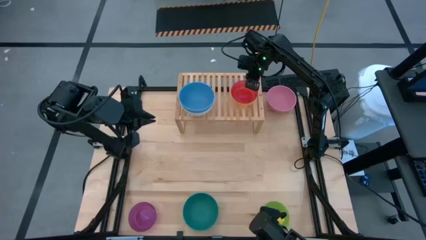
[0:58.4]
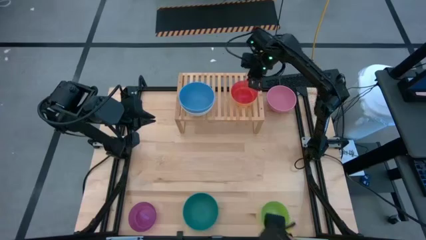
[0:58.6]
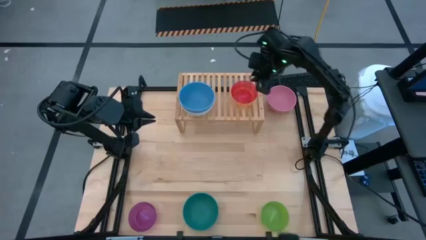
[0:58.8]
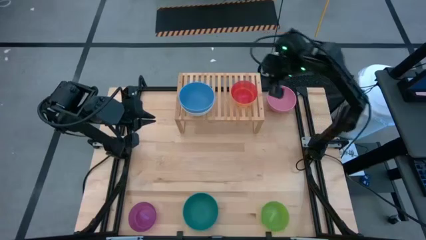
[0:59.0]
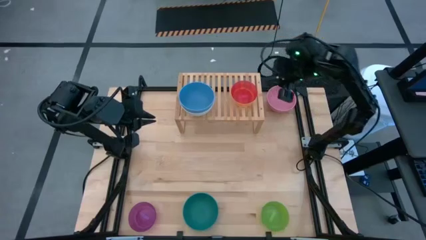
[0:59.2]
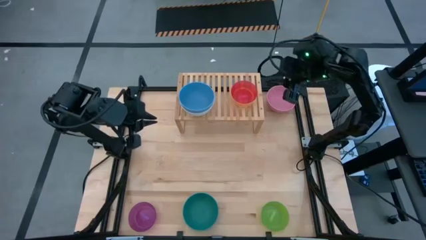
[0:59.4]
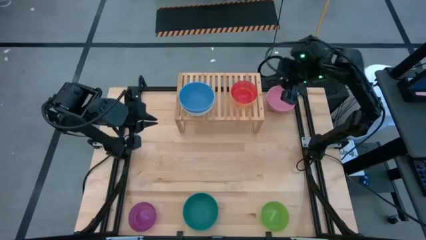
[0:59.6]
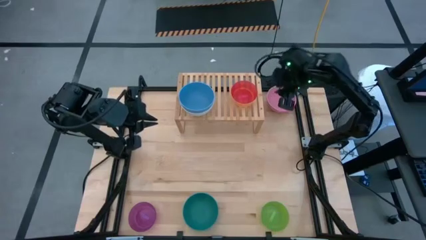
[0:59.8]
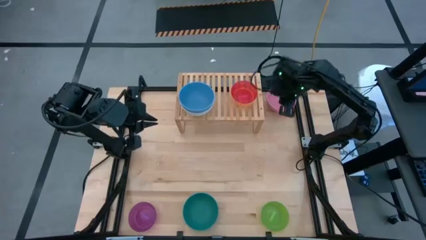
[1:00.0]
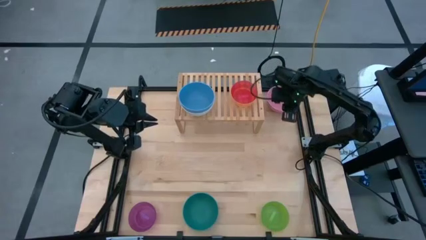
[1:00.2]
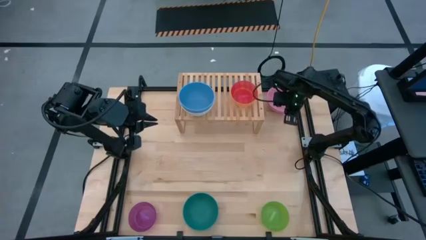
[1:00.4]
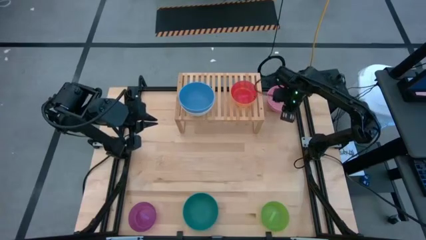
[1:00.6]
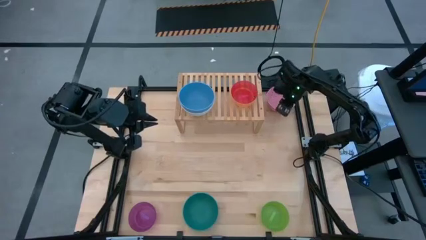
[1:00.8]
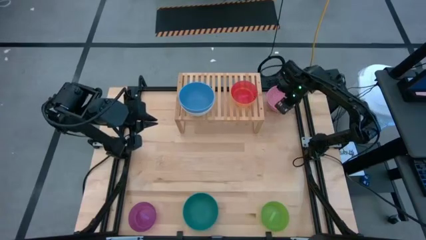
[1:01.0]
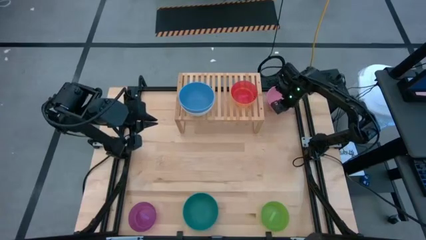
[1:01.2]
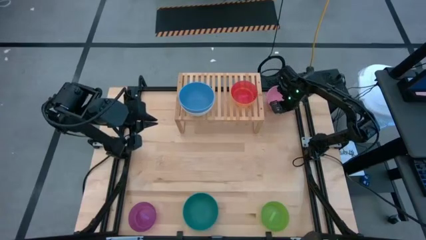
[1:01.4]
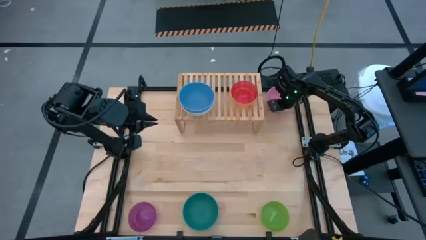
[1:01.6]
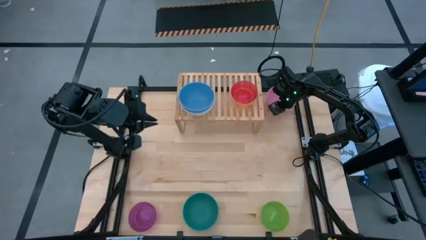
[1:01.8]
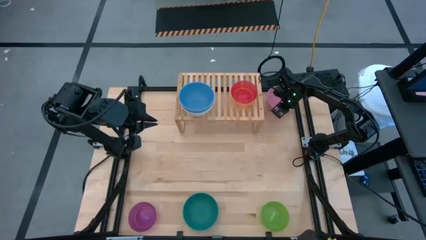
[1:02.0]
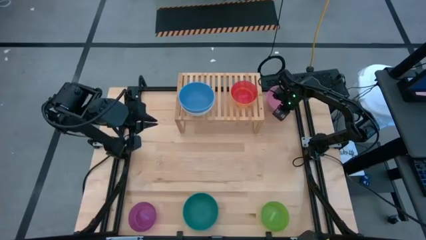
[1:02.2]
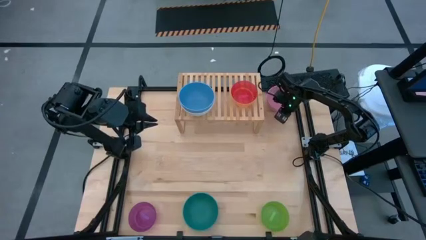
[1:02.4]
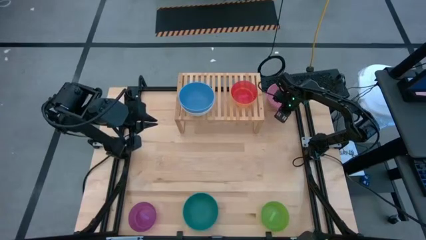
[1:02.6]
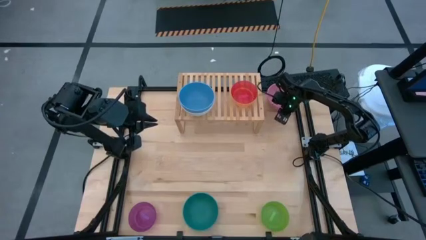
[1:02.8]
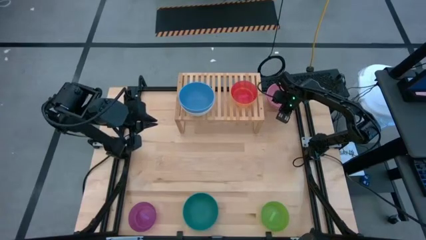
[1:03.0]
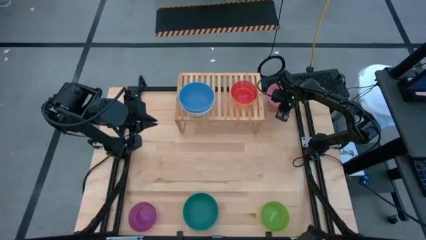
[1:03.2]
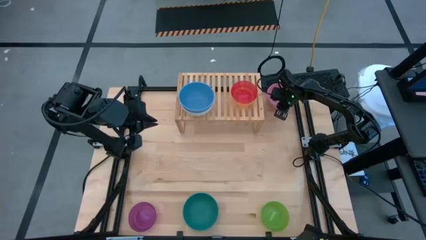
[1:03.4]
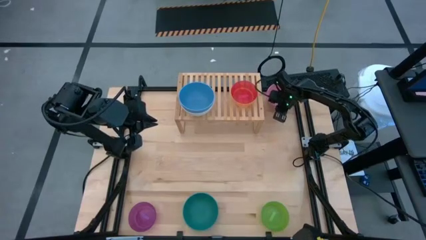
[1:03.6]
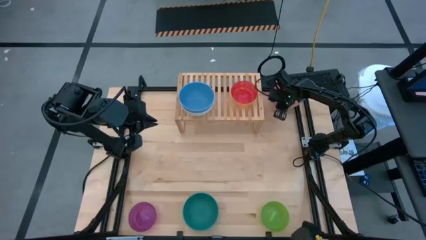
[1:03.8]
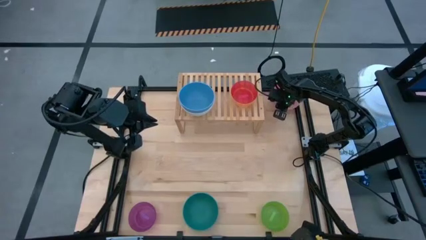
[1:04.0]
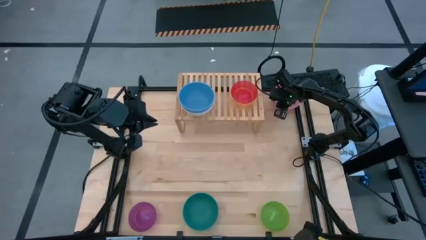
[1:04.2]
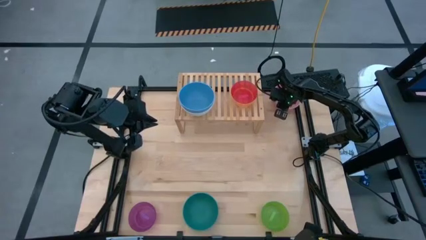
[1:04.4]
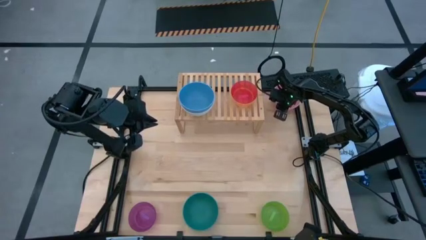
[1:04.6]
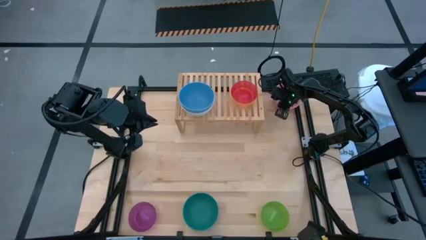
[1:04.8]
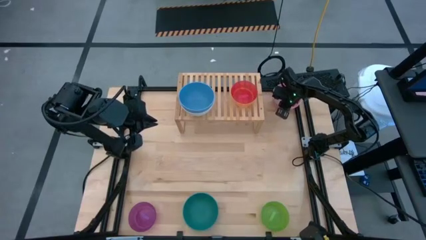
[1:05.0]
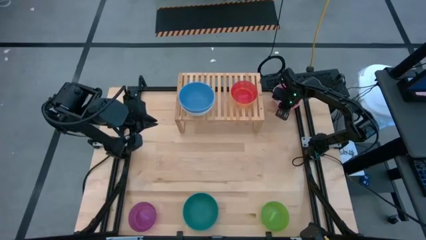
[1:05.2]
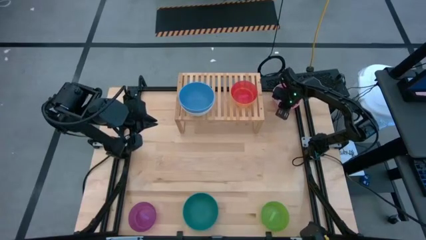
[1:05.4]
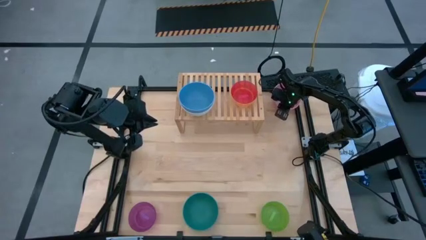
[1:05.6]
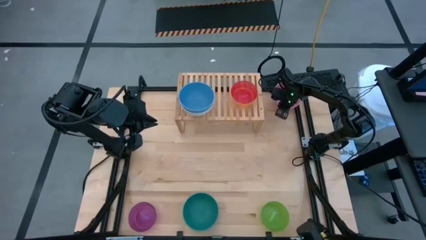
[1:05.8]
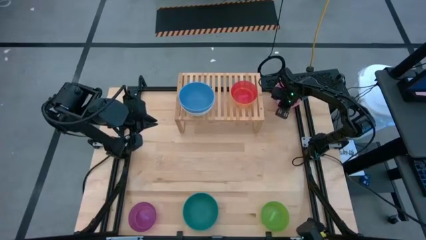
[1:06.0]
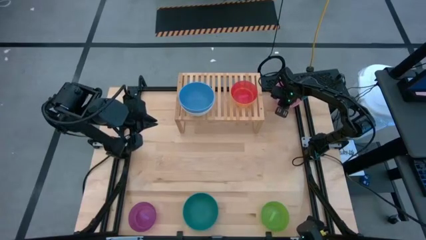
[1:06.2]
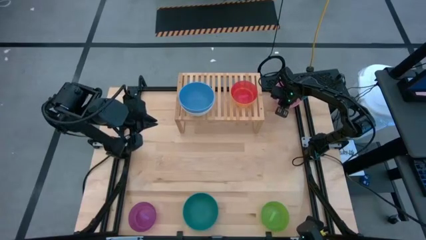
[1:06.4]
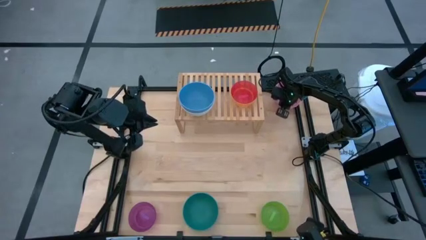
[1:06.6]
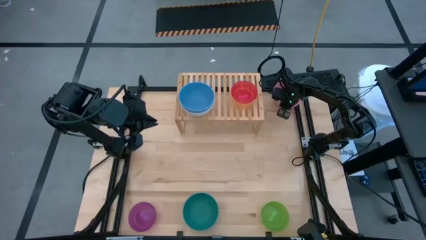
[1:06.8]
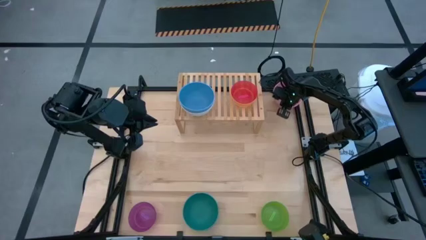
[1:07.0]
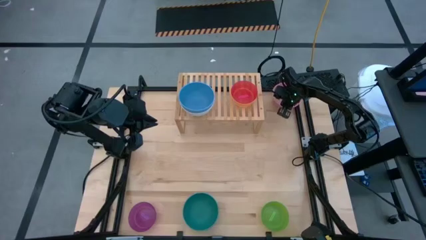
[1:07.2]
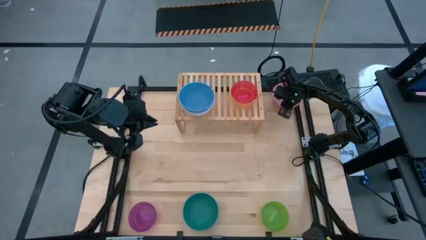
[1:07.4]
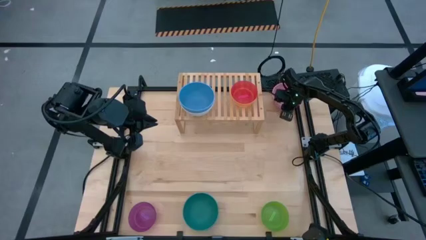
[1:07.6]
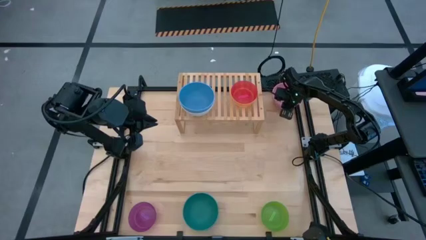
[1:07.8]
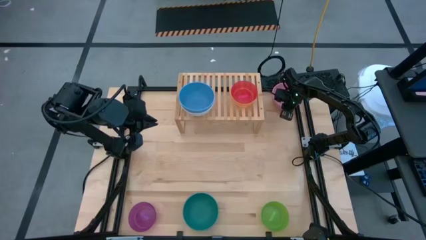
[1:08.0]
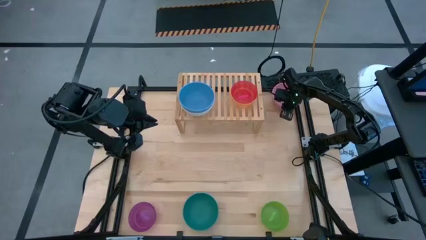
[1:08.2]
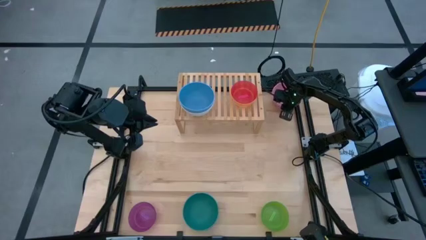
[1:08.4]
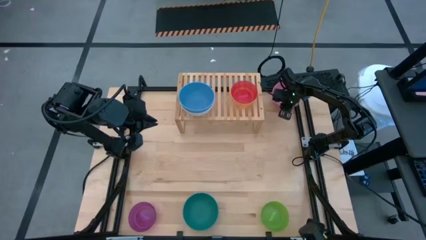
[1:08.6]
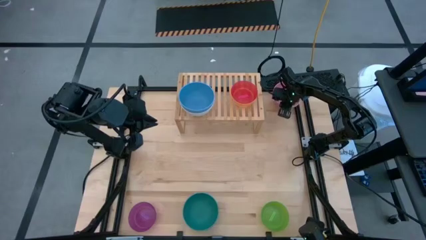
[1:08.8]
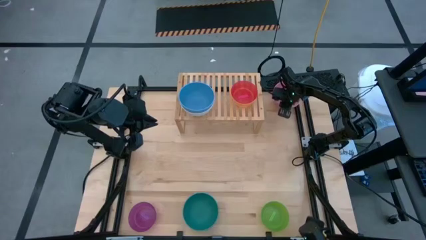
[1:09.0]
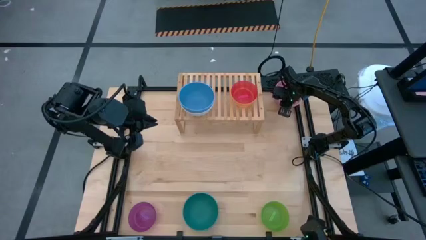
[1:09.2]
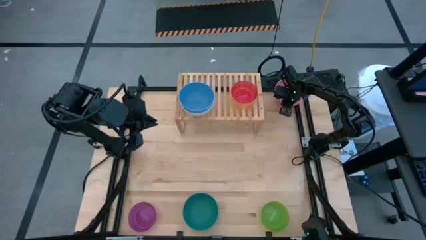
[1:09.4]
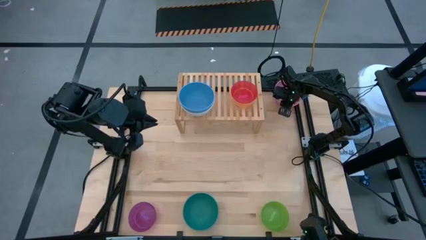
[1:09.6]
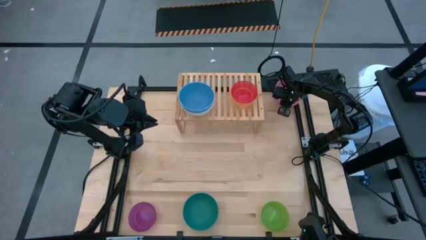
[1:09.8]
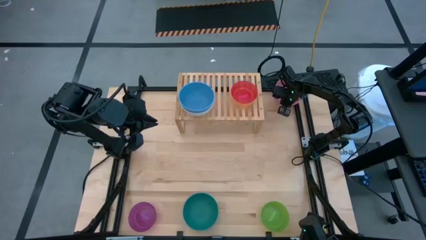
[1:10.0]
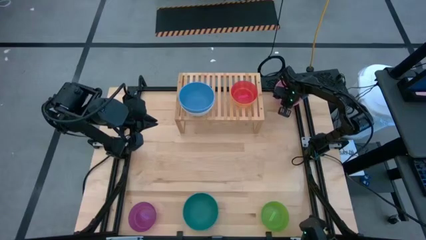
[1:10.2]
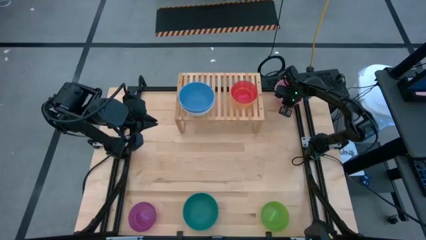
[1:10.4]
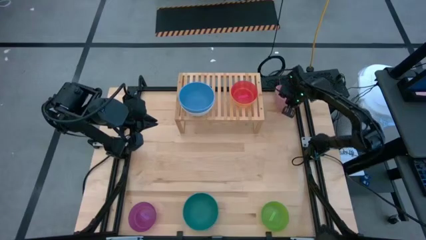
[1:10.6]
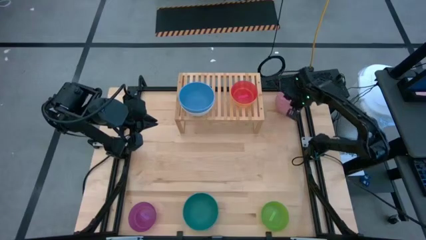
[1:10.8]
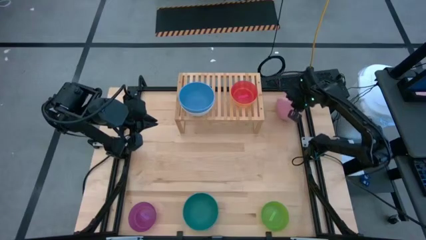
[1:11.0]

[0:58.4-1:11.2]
Task: Place and stack bowls onto a shelf
Stack the pink bowl on top of the blue bowl on the shelf

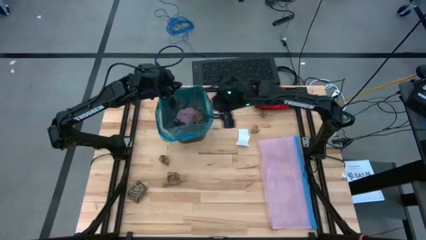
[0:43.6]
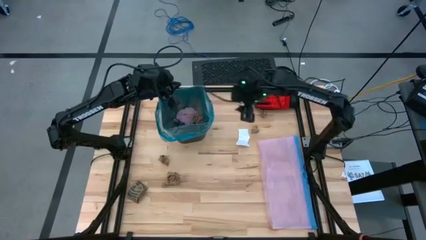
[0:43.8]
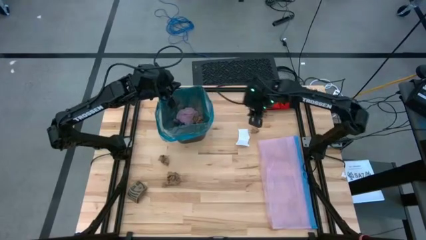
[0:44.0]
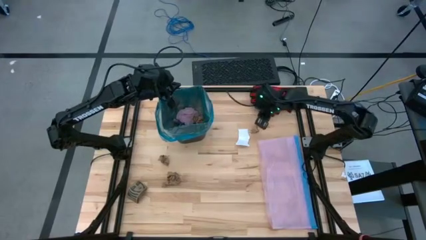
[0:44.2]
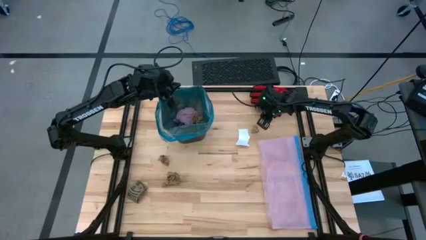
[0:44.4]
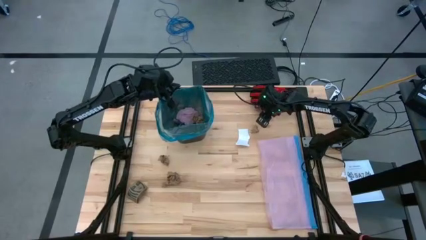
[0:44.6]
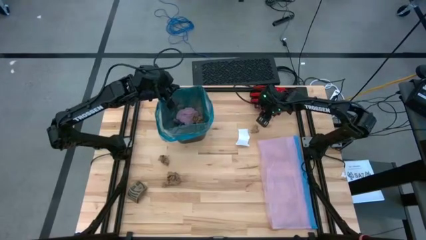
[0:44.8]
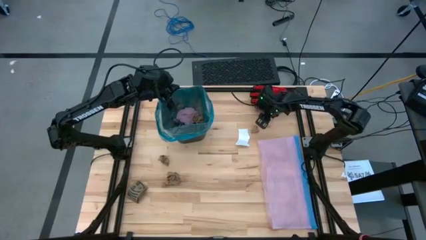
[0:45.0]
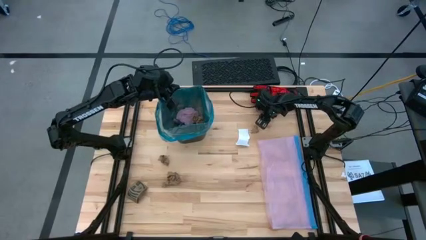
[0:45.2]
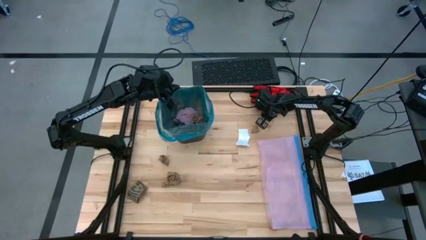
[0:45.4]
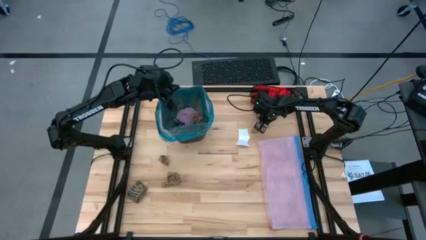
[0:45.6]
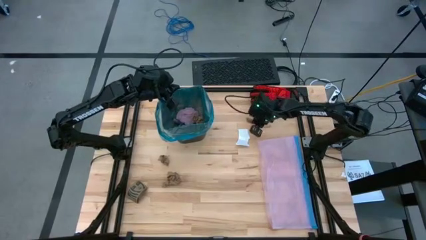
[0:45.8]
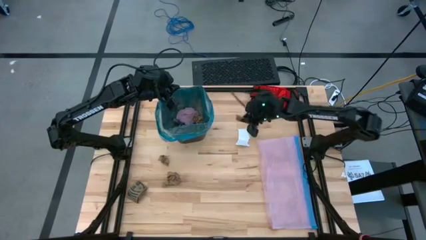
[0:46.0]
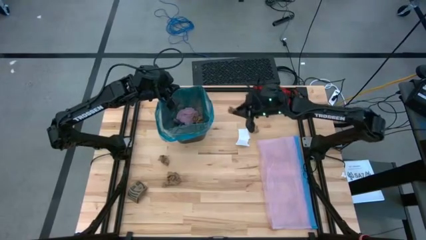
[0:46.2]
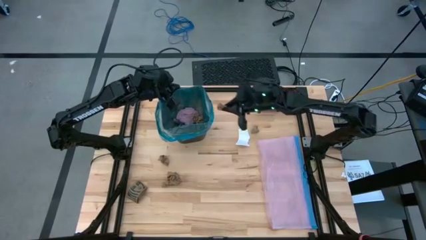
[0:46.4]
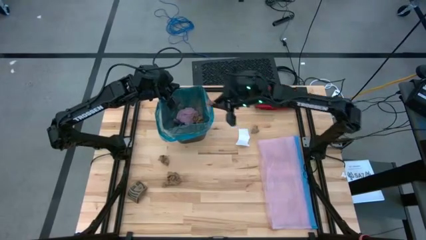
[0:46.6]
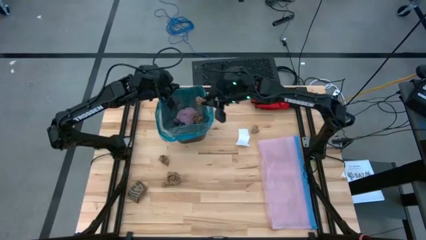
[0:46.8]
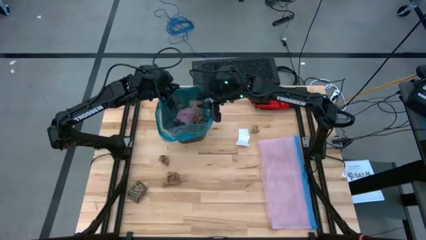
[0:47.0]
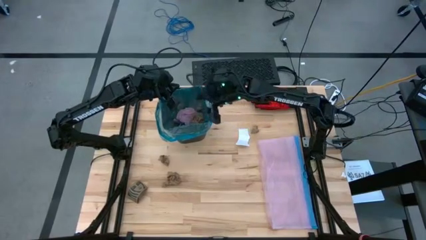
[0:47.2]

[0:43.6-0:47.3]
Task: place trash/remove bag and relplace
Put the brown napkin into the black trash bin

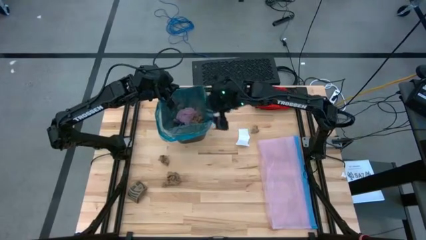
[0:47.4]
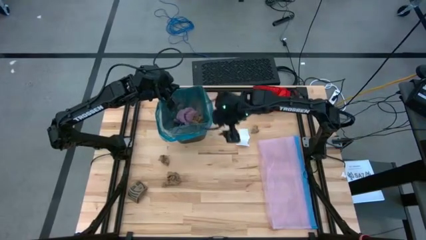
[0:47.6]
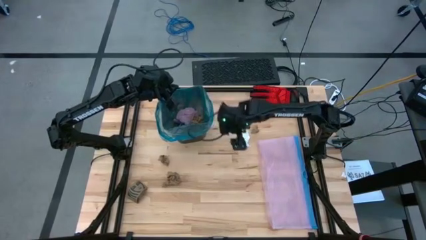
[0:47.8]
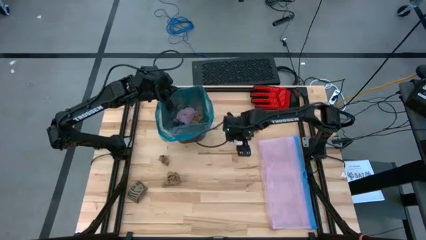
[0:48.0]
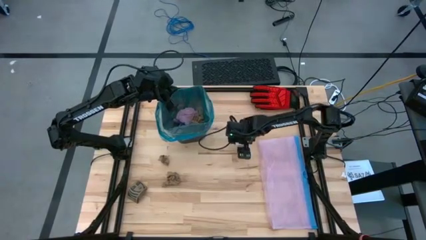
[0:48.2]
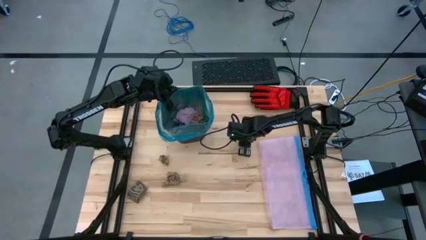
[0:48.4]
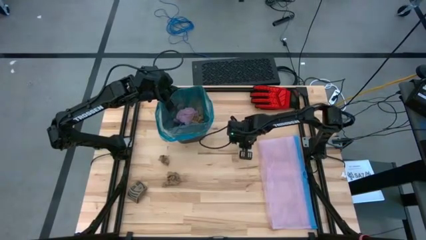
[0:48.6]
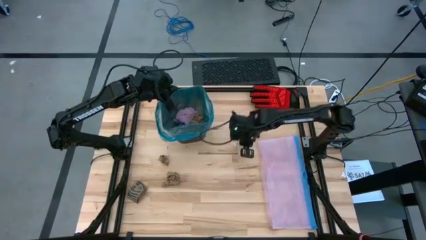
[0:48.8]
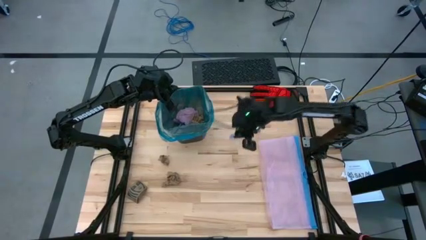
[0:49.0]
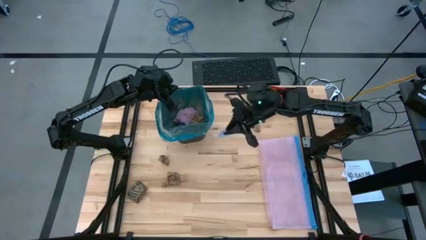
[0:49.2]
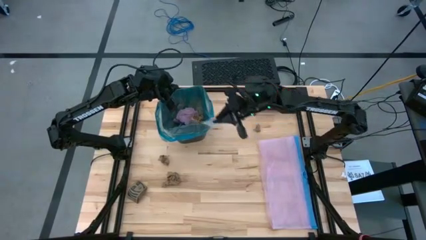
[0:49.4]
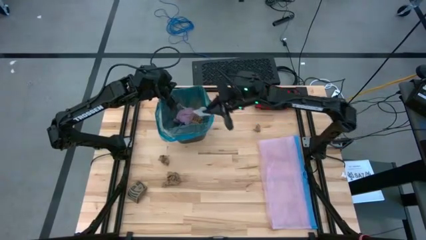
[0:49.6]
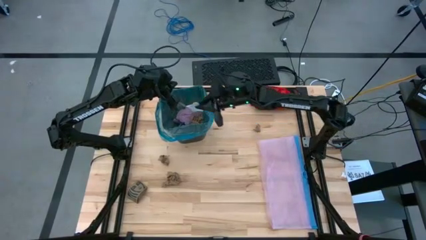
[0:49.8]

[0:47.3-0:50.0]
Put the white paper into the black trash bin
